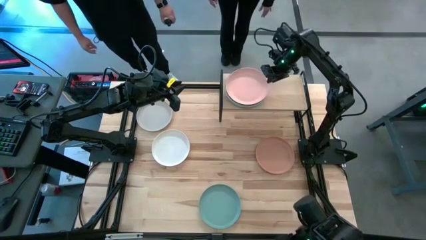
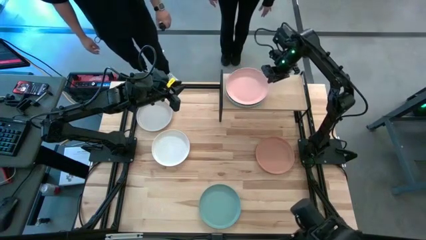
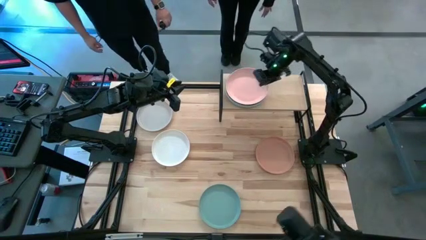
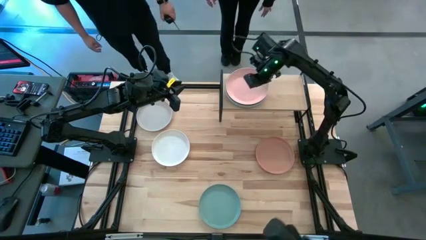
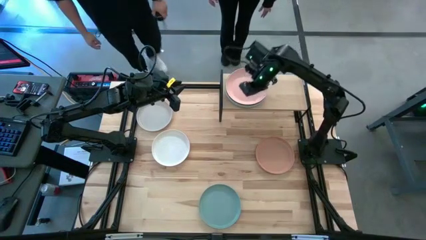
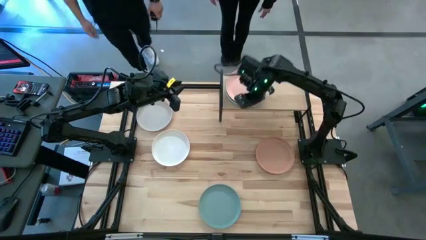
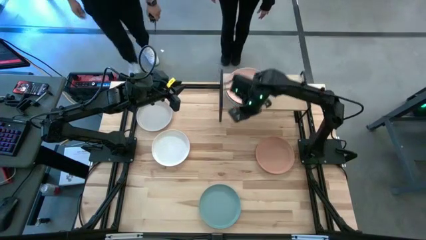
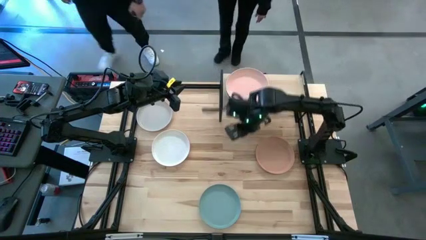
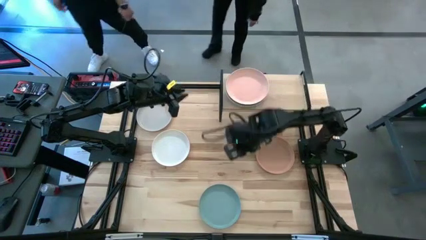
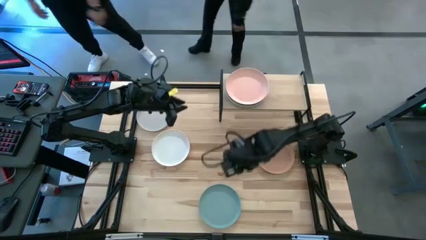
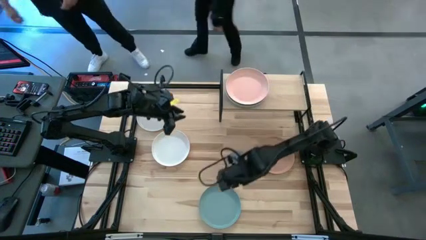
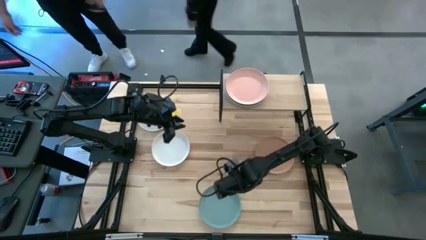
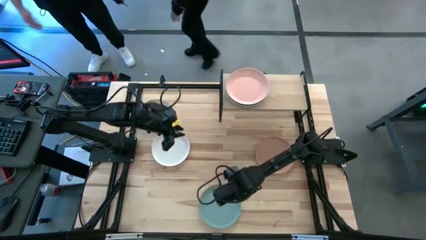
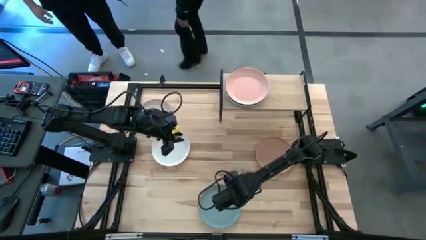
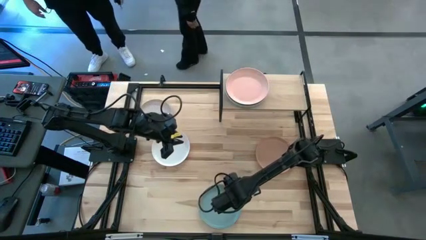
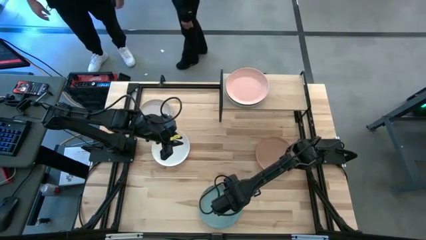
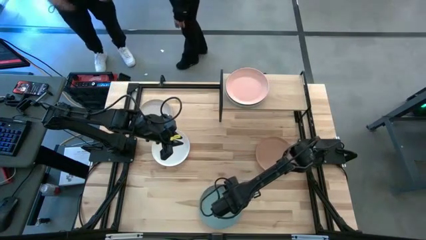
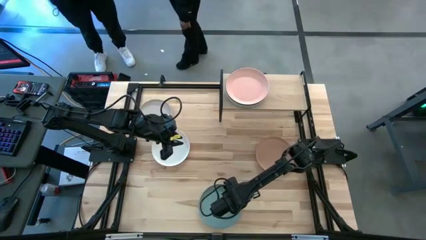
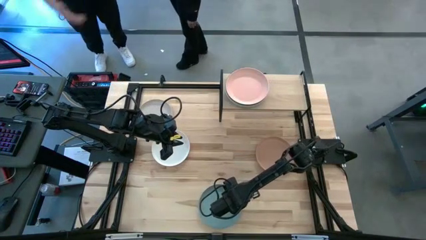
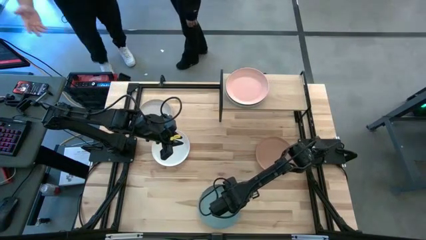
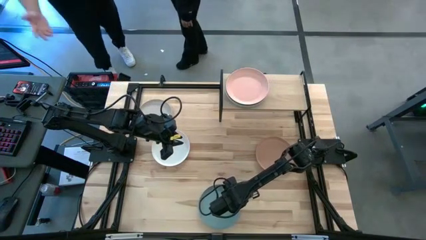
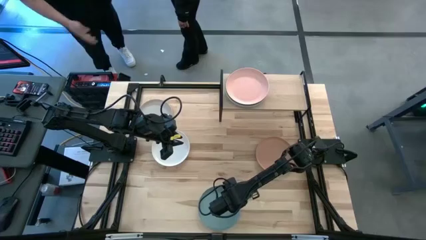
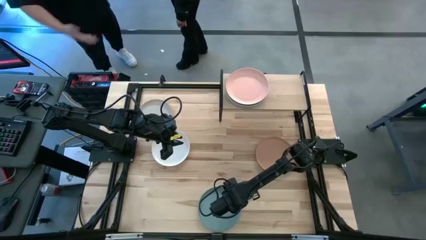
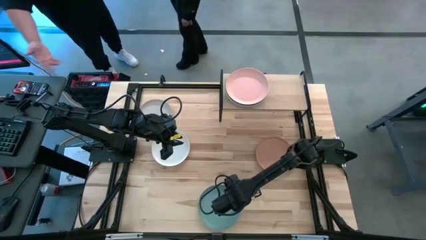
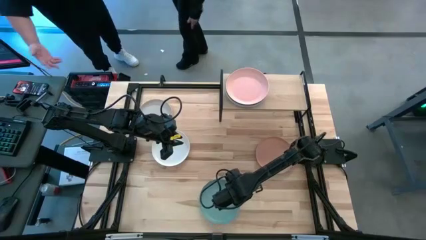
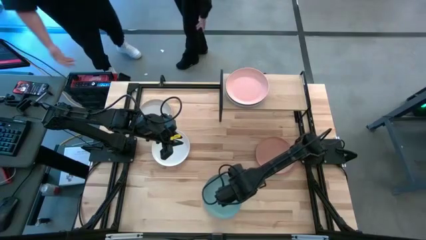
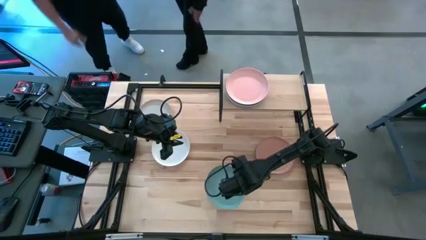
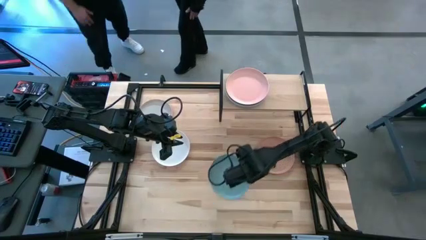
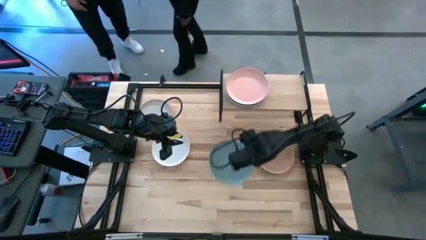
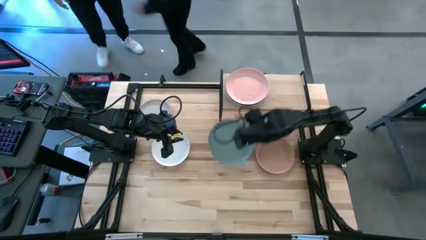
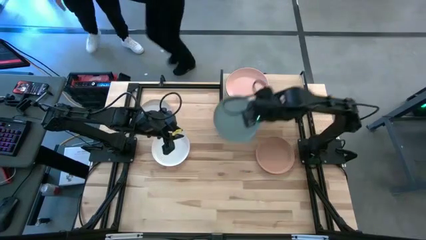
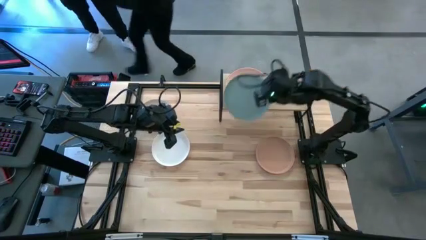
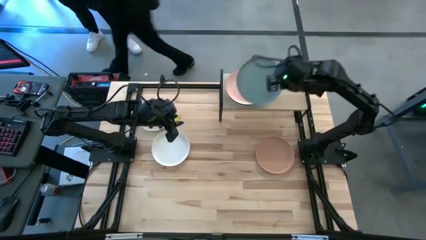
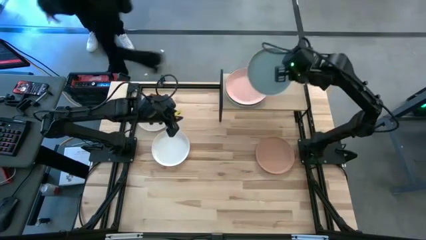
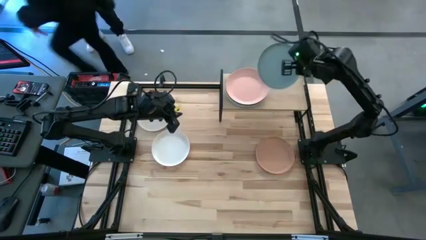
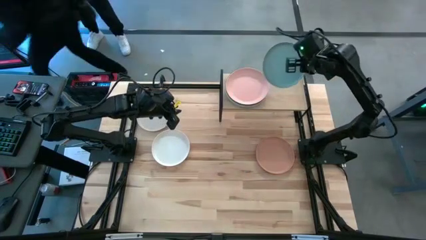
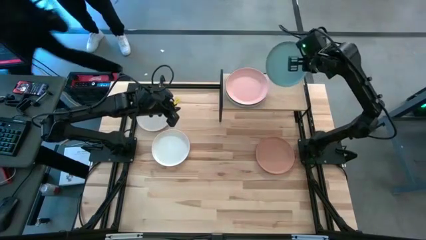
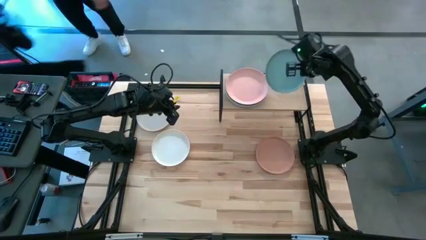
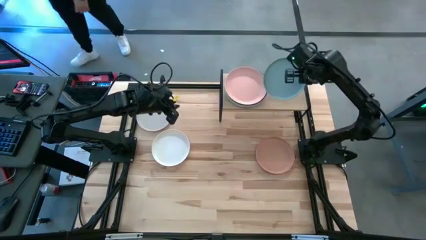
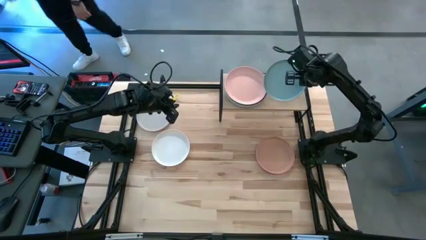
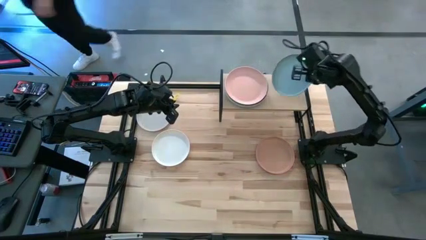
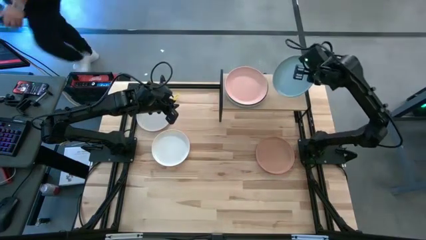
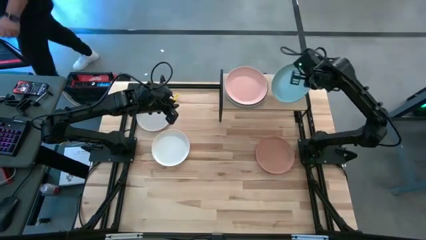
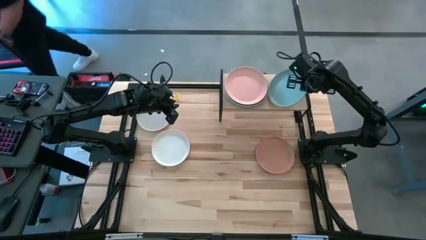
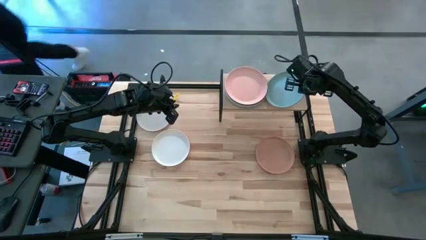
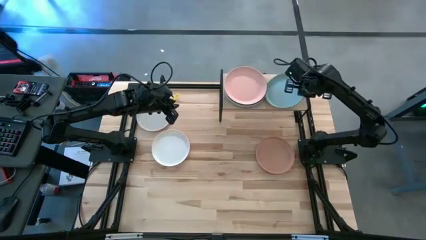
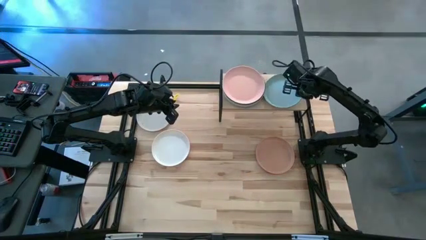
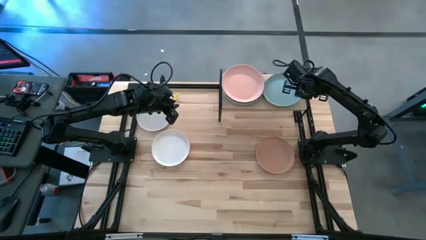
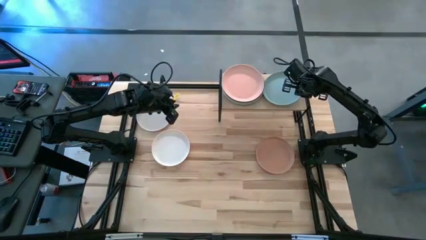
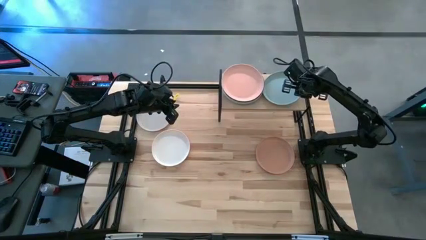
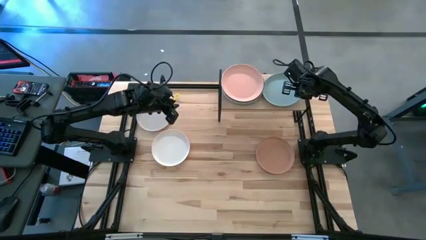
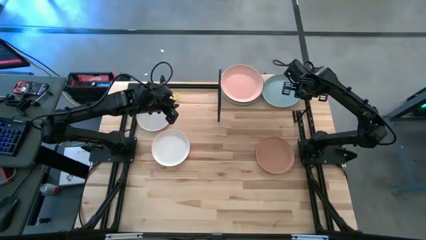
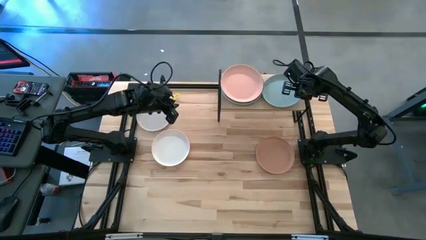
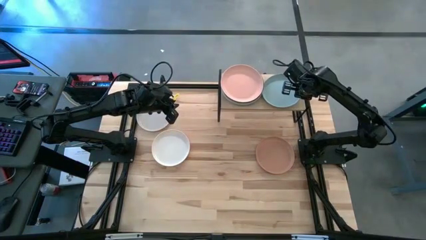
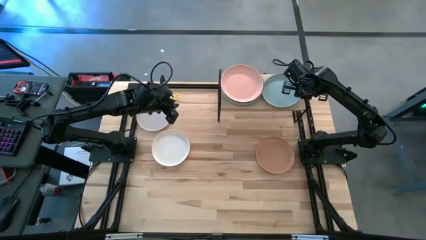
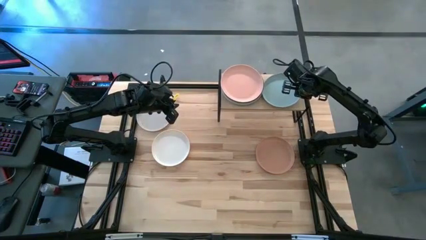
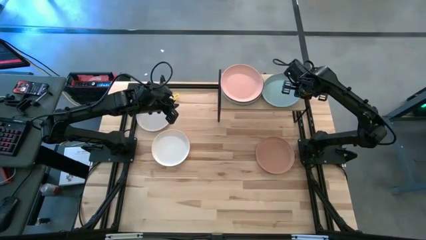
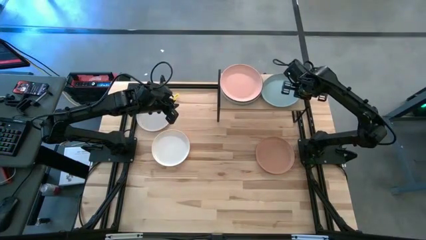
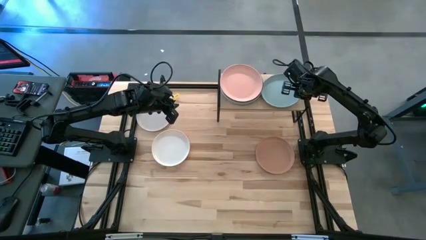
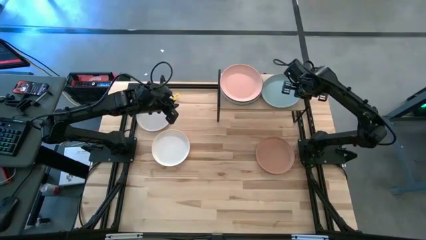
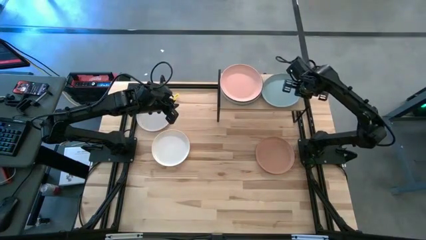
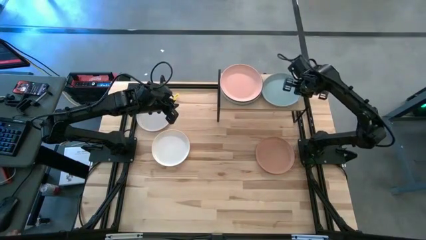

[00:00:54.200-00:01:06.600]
Task: Place and stack plates onto a shelf
Put the blue plate on the shelf

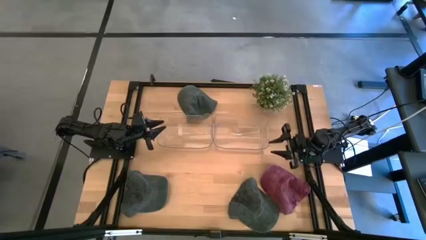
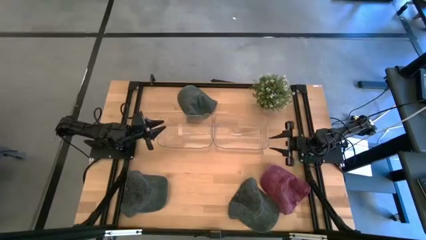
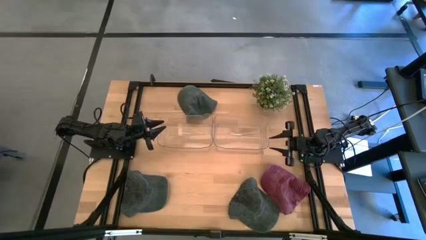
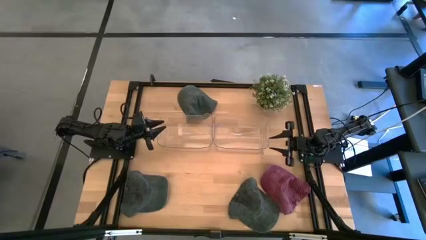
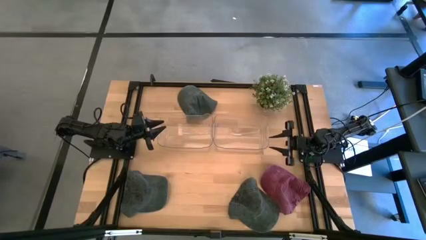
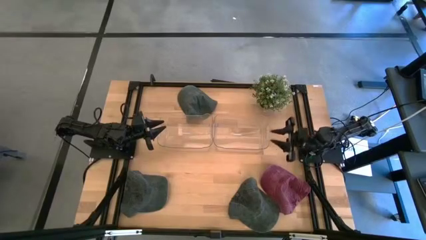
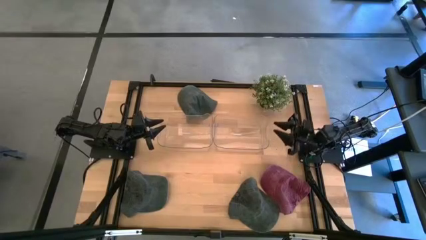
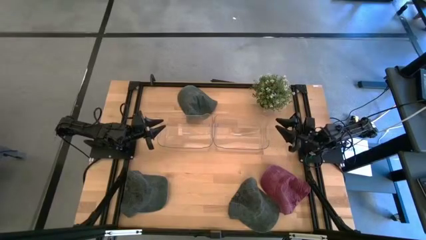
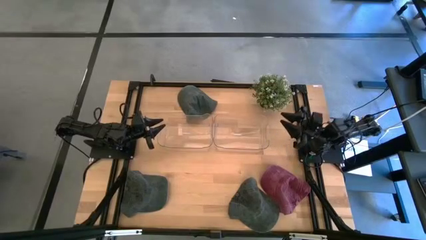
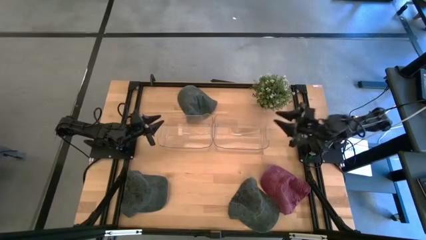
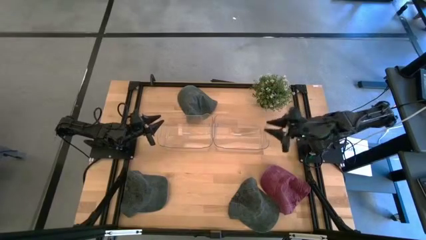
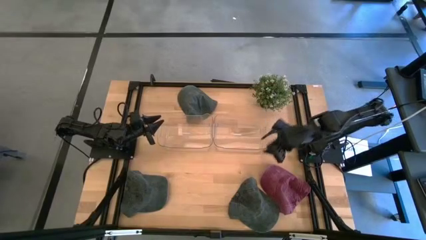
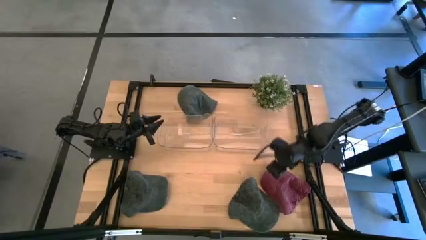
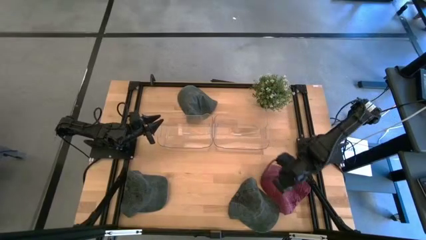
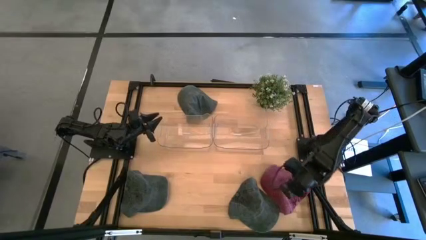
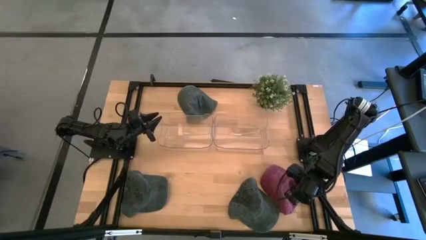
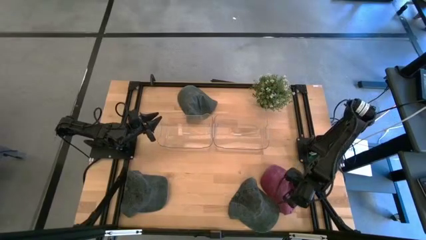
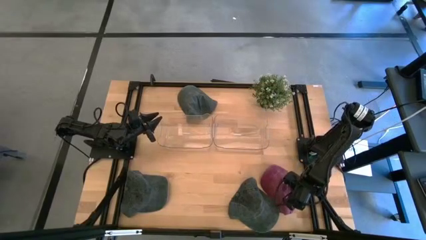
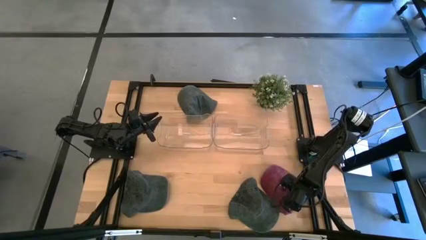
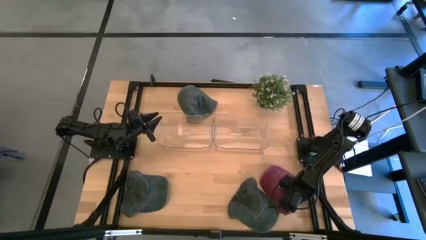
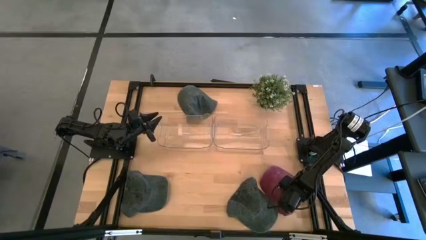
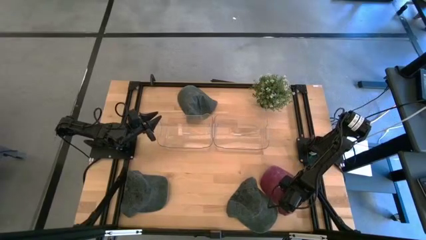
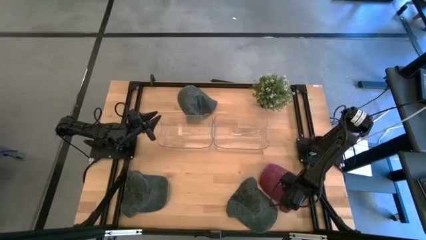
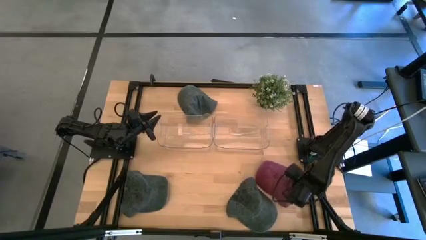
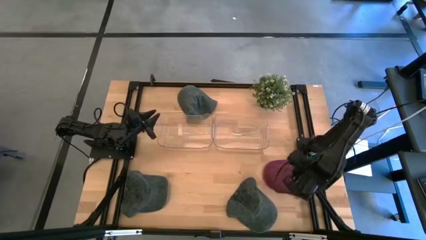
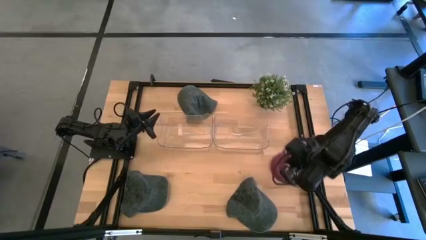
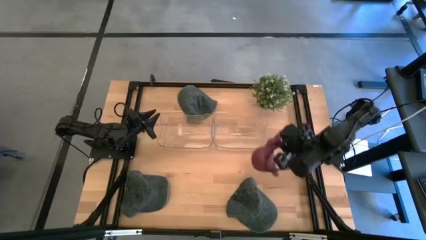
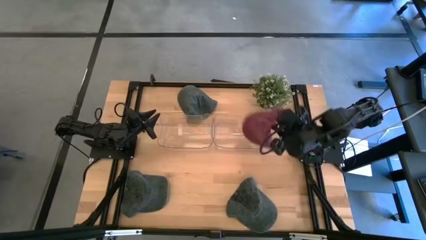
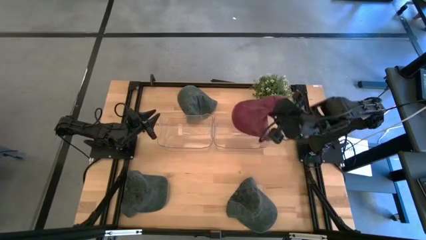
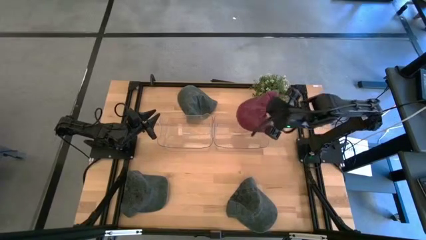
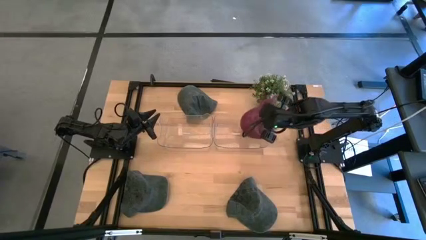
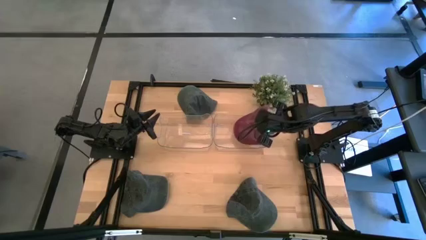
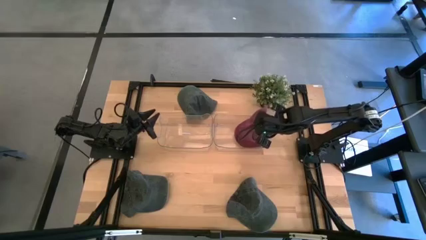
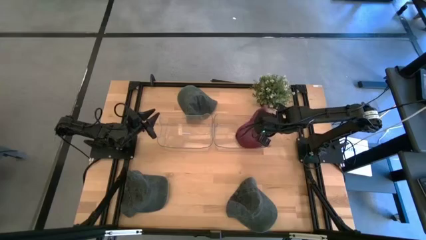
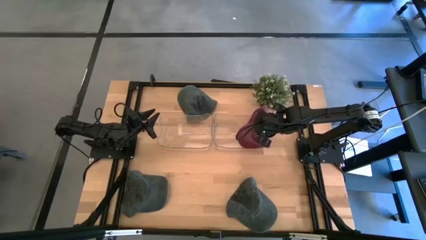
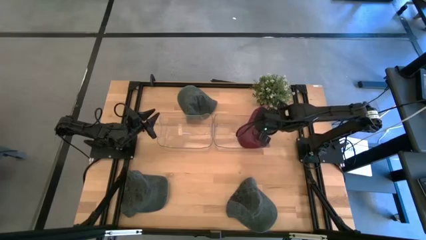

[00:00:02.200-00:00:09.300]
Task: Pick & Place hat
Put the red cap into the right transparent bin
